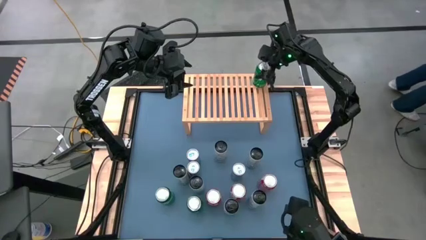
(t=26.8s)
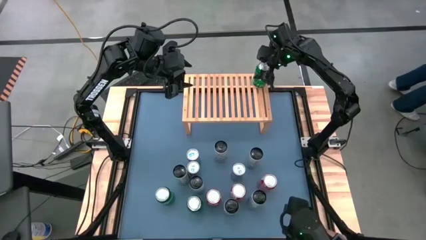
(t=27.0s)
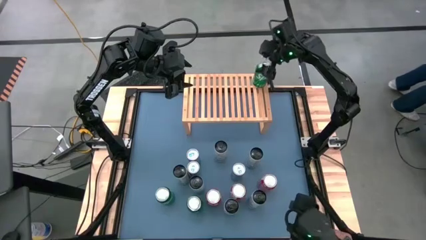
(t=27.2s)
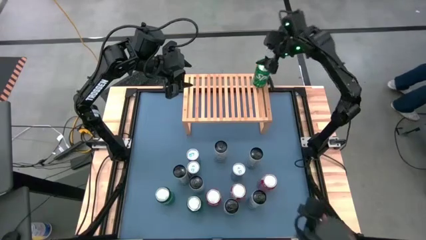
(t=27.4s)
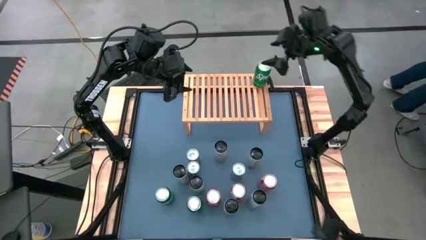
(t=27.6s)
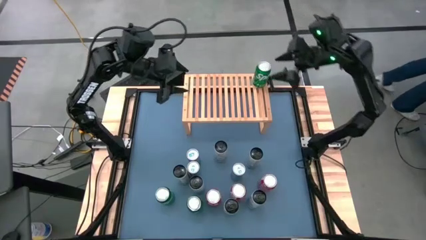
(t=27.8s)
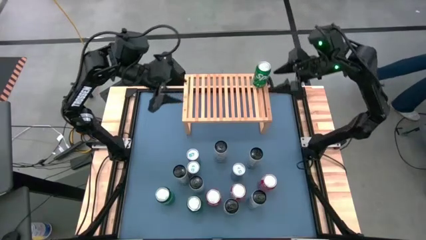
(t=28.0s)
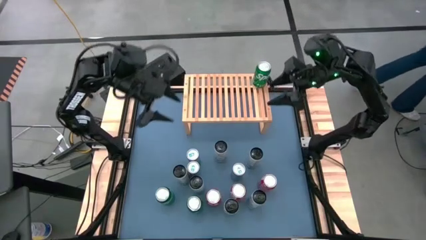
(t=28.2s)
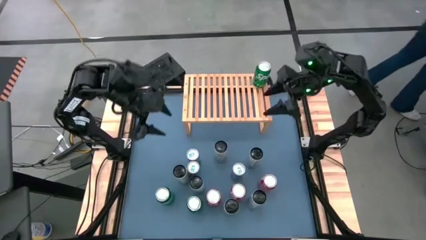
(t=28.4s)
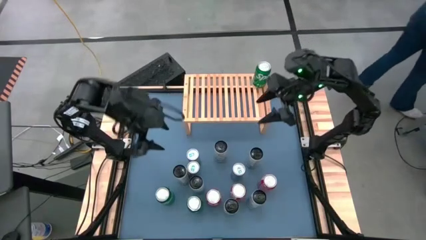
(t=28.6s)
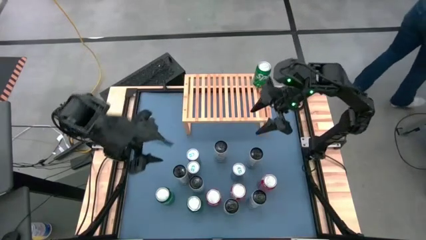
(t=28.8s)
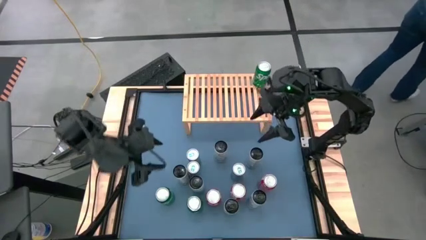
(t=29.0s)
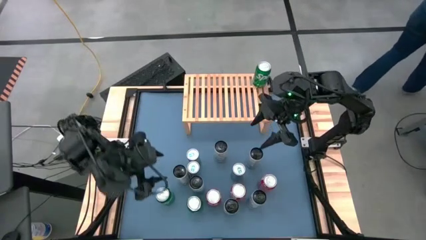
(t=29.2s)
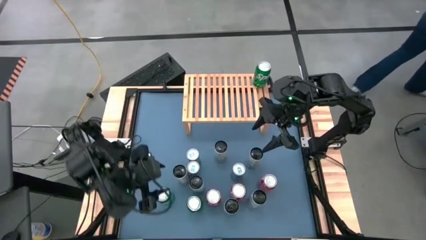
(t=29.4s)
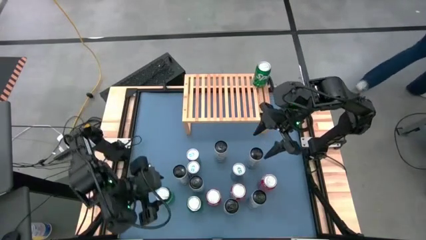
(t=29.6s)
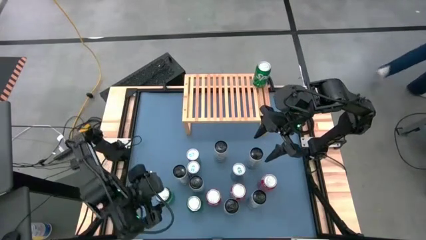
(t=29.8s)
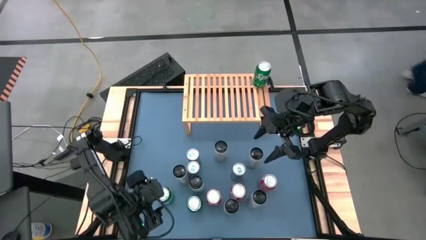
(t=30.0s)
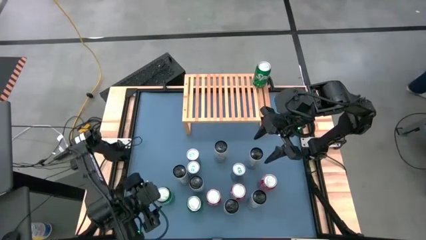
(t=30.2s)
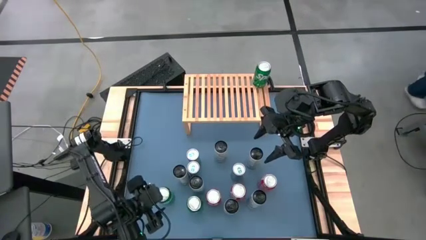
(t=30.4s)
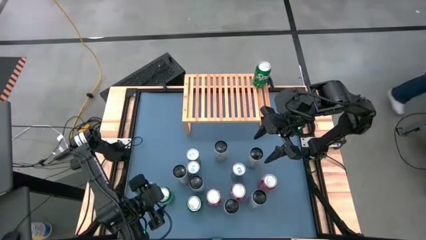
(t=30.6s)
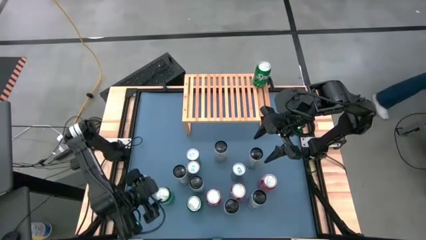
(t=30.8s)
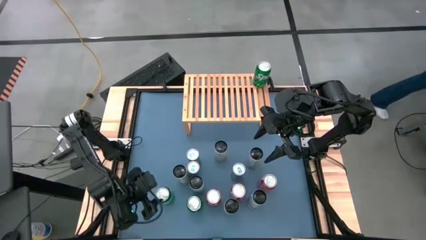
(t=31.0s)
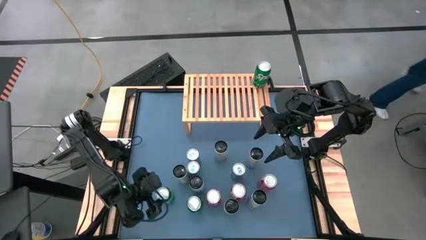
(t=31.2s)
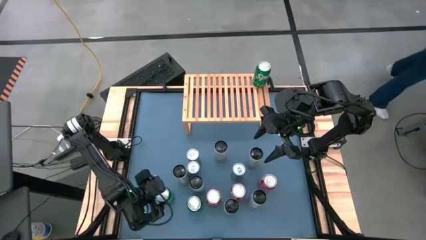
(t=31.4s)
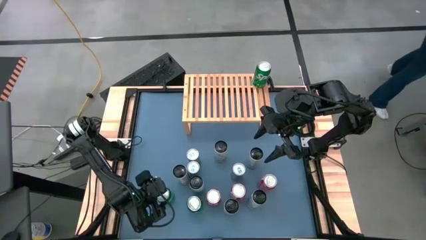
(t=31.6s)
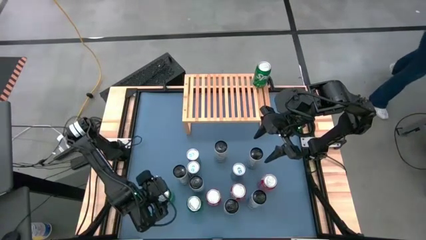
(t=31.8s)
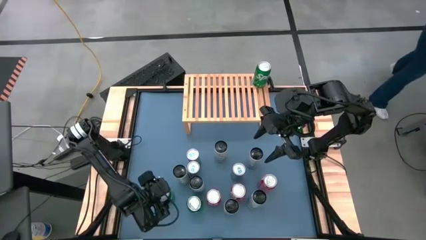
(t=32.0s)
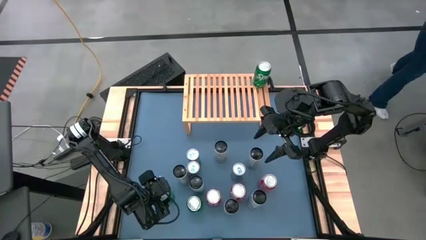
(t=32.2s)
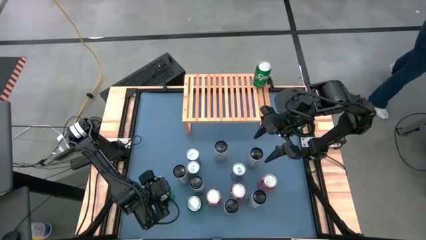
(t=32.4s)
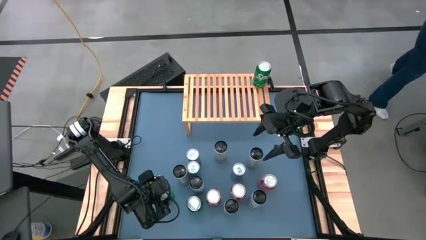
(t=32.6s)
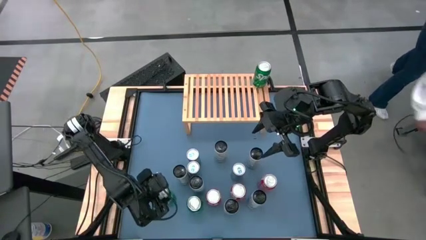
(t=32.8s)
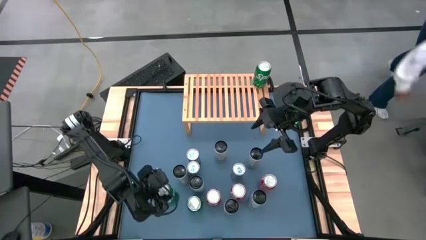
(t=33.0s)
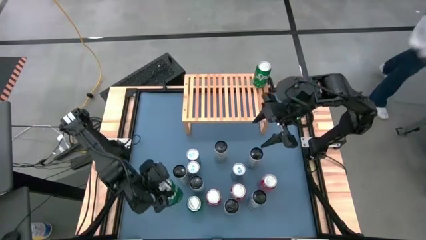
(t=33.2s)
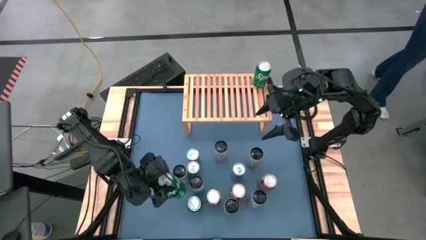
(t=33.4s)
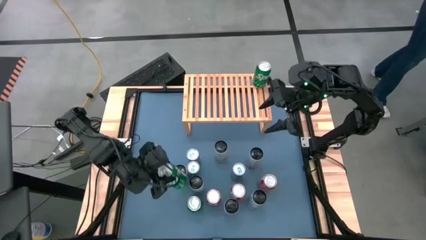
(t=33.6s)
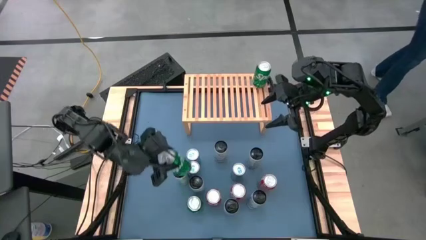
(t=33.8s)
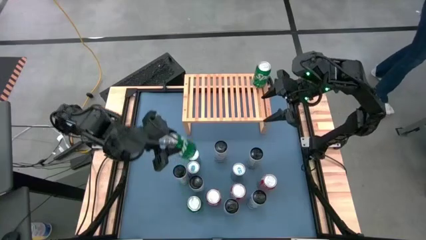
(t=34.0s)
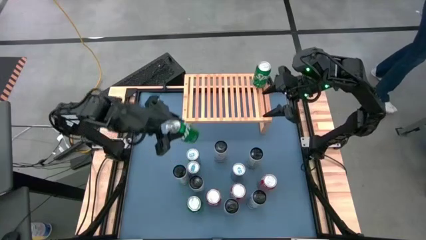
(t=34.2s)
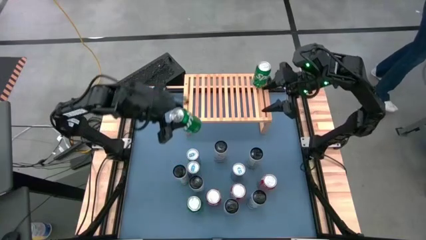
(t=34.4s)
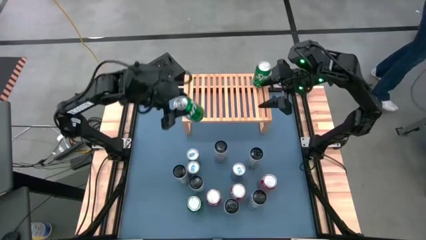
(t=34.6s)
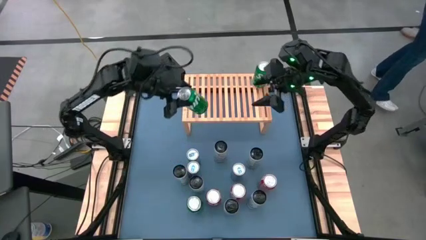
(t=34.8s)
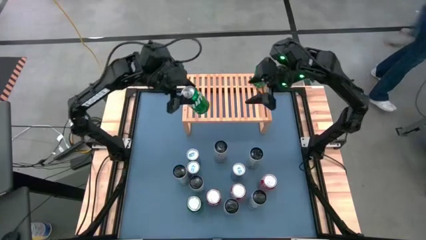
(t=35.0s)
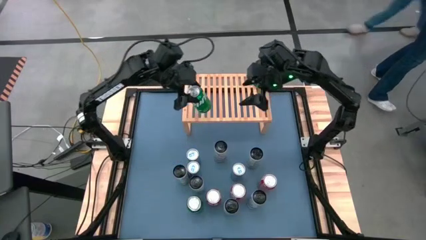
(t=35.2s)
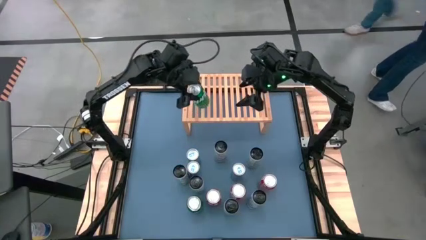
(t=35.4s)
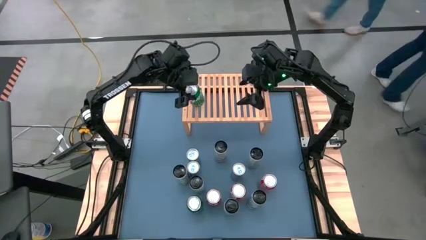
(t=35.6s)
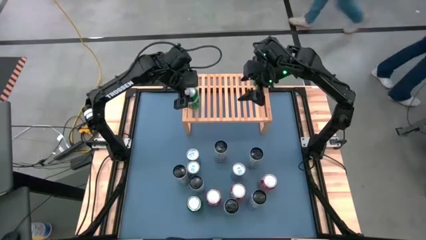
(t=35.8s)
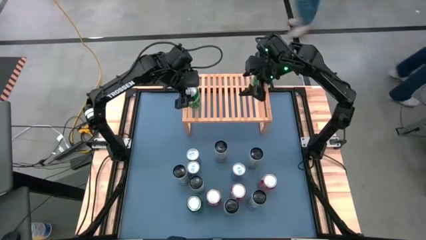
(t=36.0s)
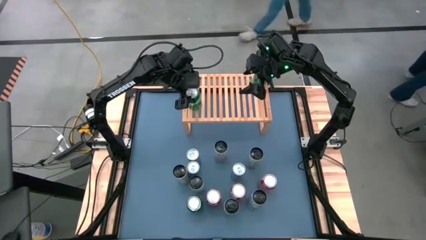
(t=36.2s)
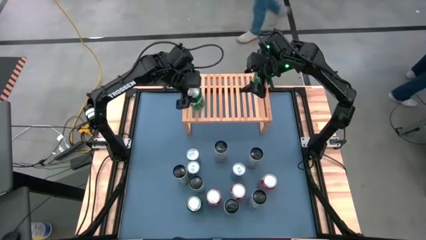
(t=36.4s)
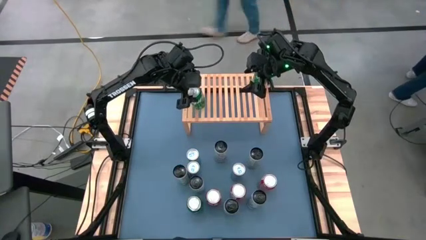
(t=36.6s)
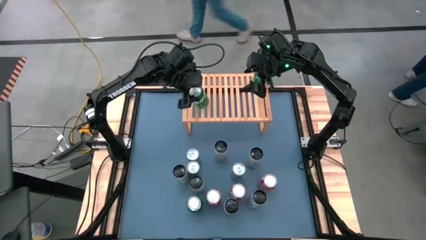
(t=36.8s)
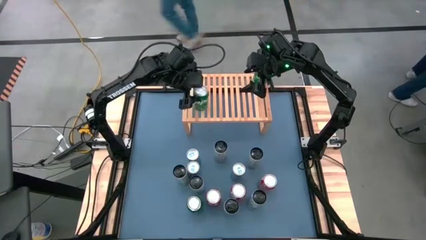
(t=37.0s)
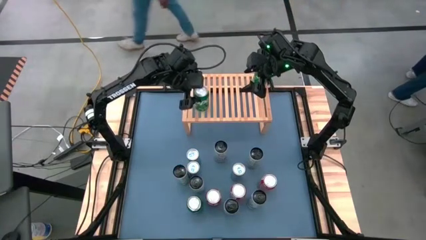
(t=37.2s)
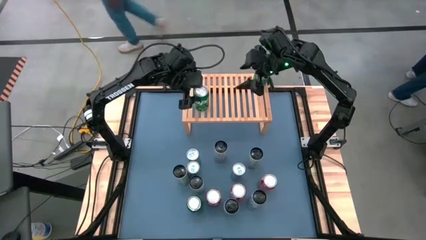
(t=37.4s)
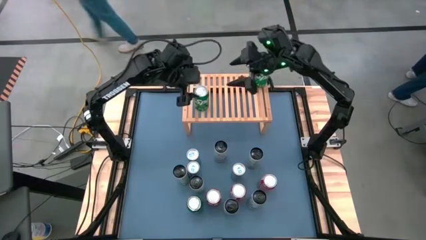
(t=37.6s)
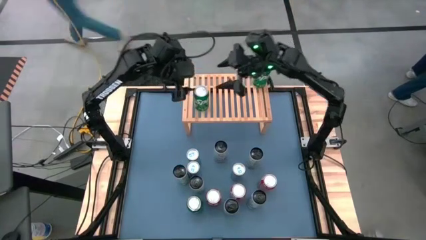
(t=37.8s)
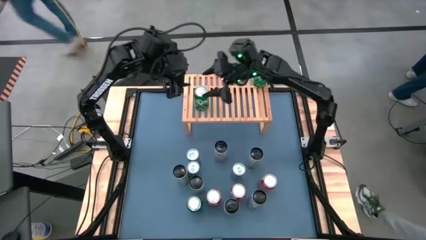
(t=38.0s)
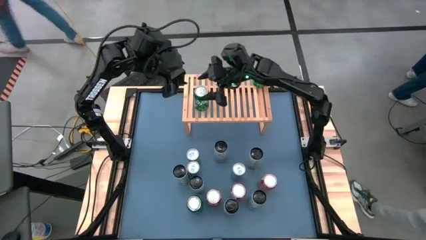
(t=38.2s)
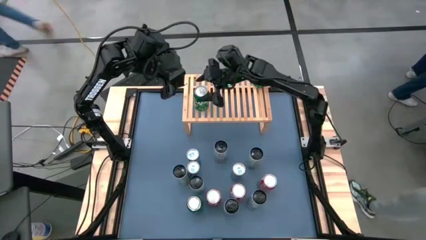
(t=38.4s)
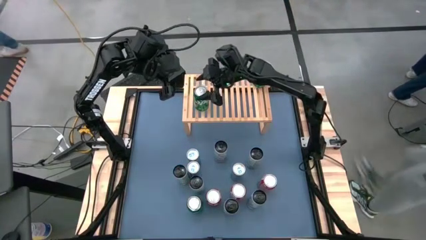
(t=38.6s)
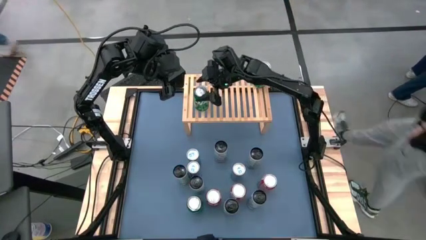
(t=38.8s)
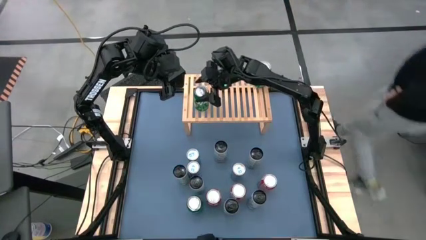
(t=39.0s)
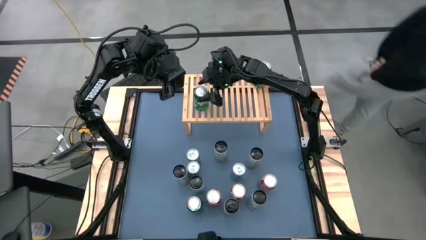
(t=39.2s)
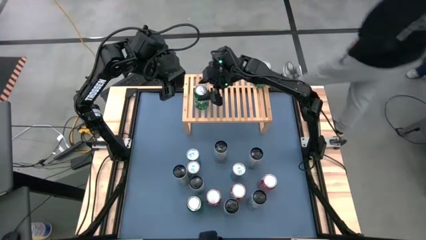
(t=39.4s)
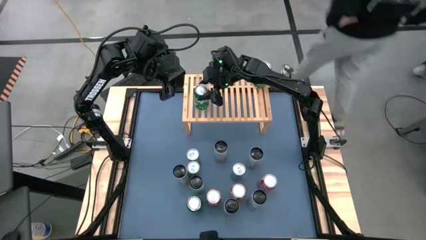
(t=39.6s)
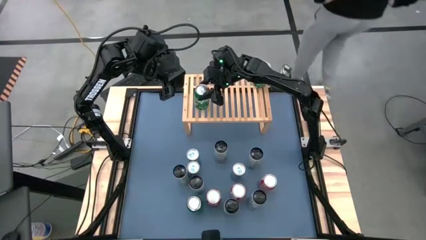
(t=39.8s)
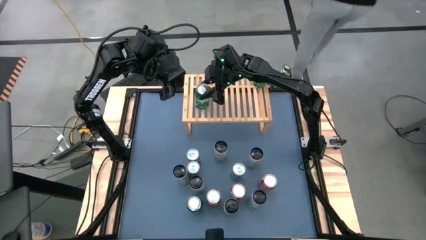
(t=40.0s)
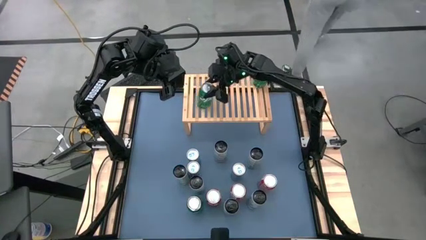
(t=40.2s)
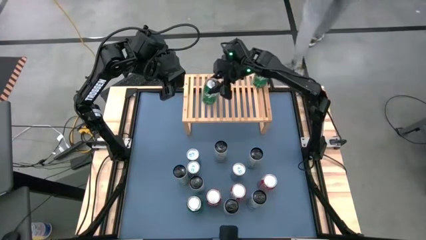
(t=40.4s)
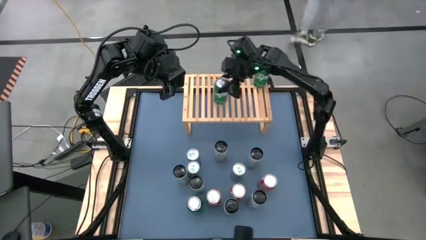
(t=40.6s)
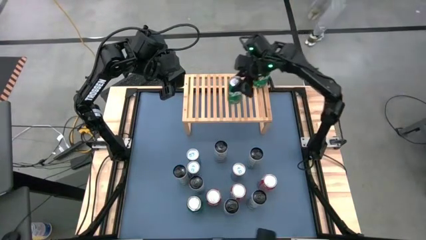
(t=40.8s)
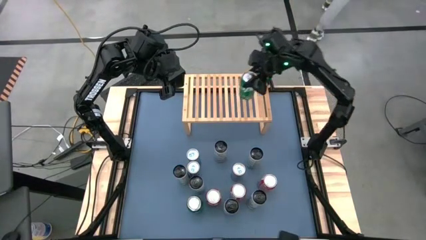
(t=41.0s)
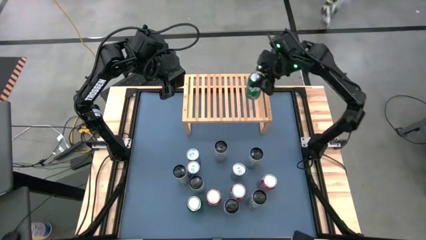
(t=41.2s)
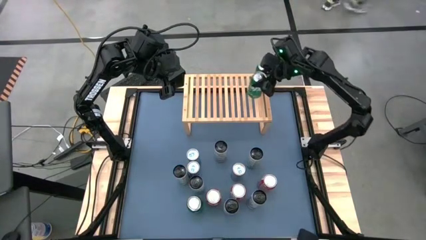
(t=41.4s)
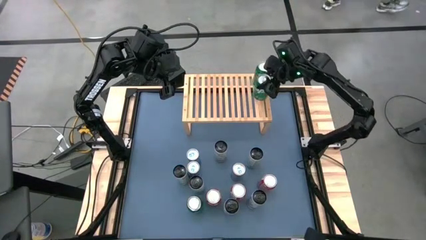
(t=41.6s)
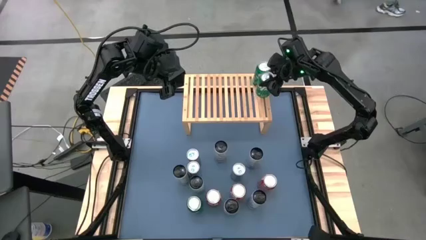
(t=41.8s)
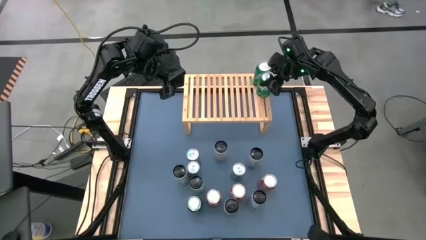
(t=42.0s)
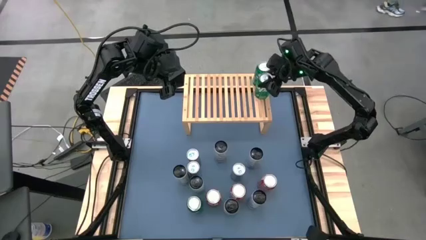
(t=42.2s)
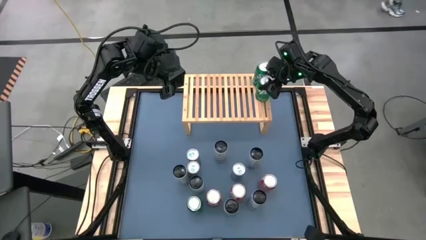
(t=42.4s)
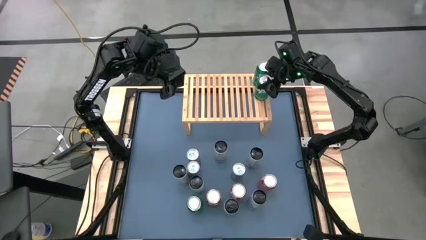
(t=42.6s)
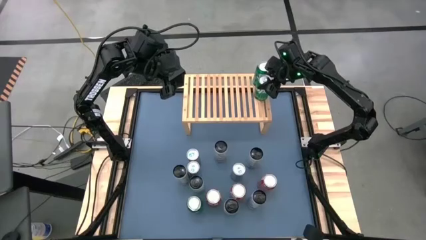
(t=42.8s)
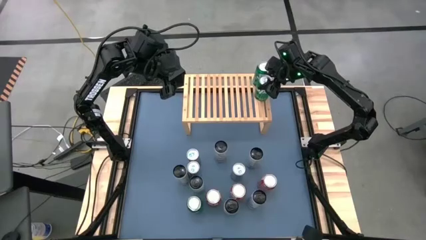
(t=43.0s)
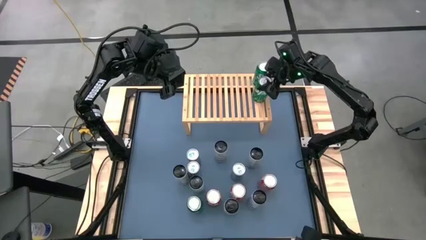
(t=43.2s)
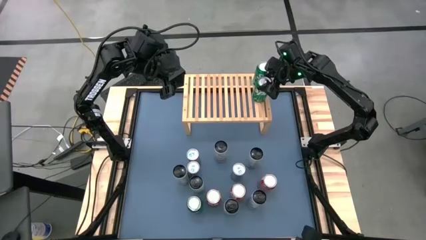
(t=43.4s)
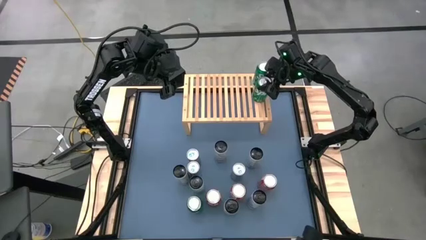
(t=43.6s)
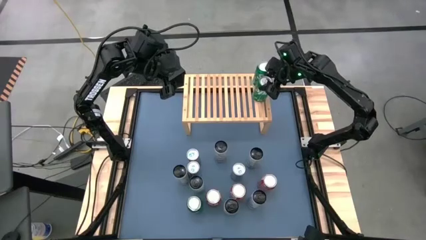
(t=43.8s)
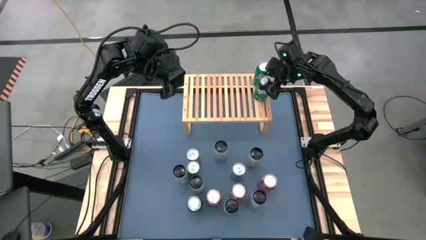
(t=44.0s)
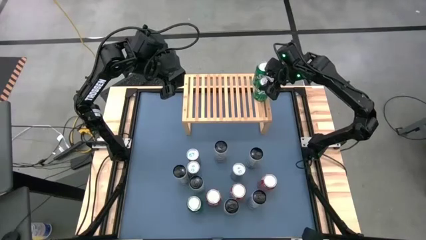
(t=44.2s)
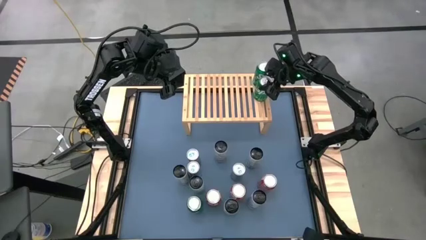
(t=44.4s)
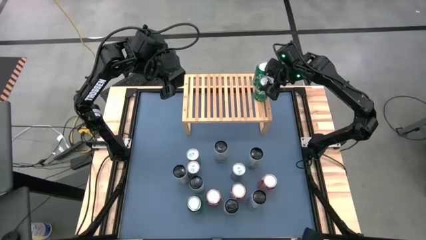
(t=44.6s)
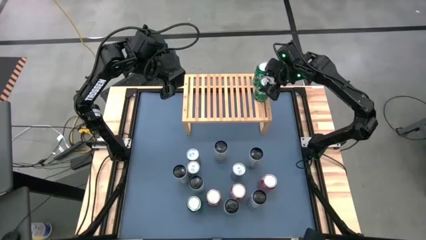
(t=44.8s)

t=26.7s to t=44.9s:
Task: Place canned beverage on shelf
Put the left green soda can on the shelf aligned with the other green soda can
